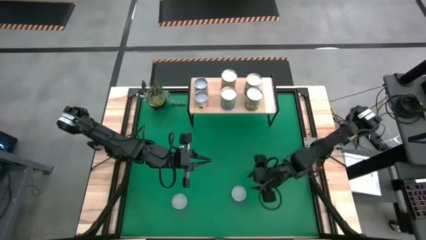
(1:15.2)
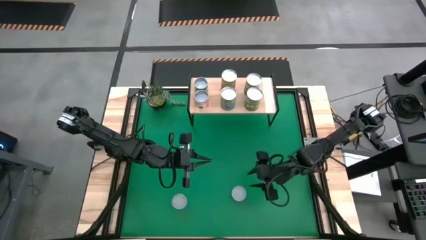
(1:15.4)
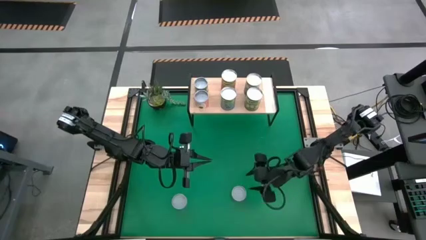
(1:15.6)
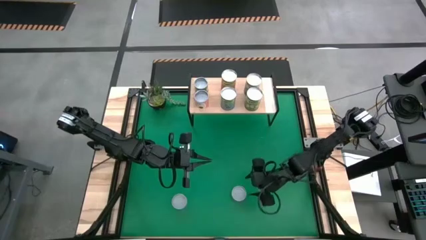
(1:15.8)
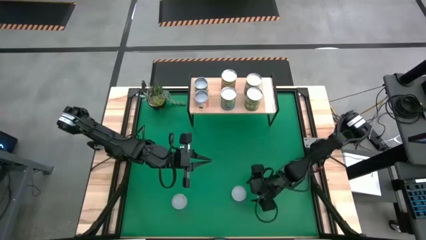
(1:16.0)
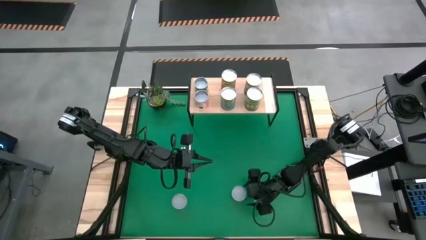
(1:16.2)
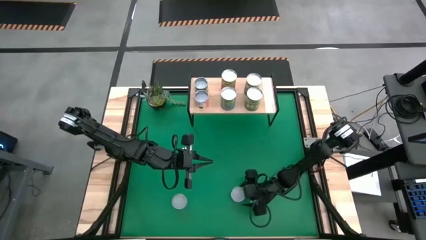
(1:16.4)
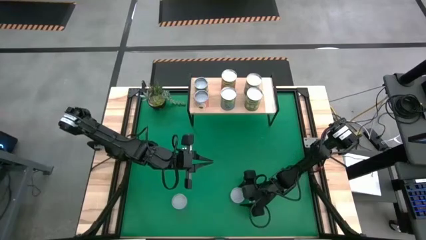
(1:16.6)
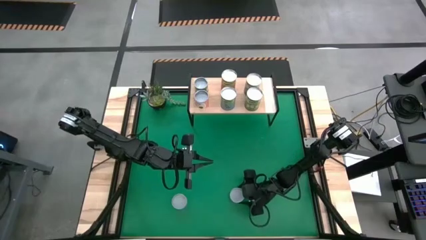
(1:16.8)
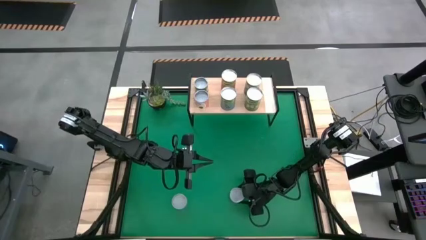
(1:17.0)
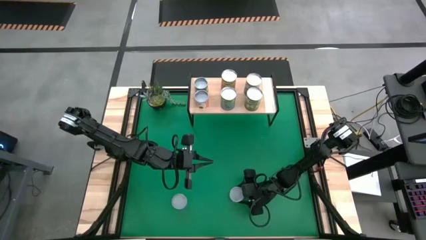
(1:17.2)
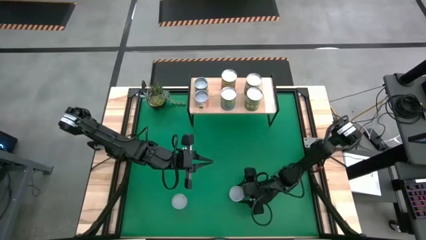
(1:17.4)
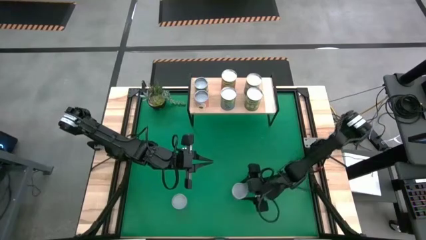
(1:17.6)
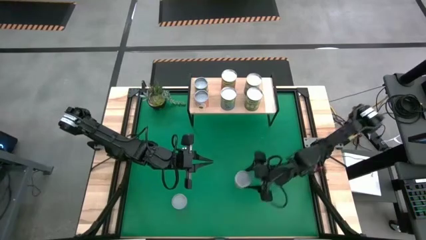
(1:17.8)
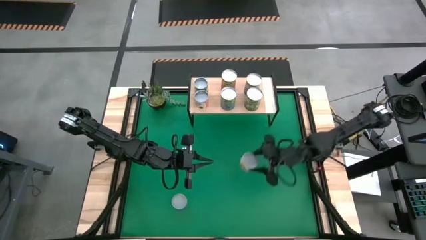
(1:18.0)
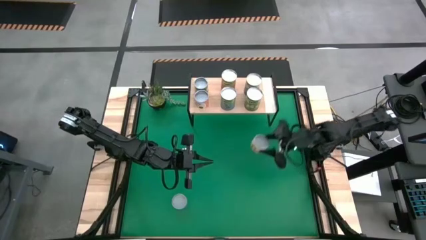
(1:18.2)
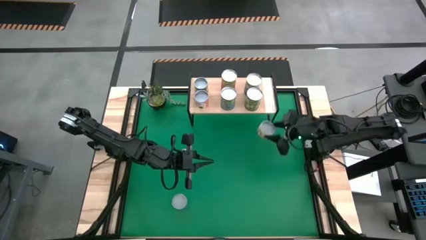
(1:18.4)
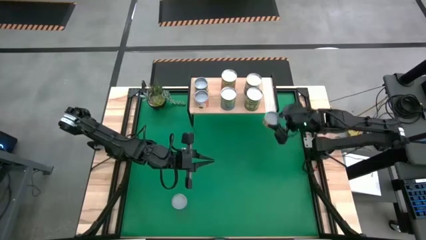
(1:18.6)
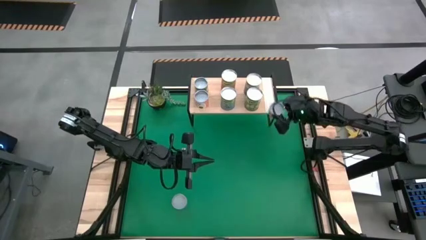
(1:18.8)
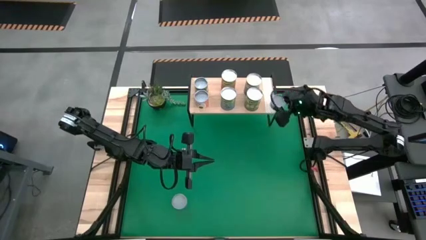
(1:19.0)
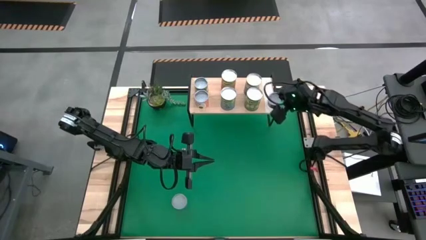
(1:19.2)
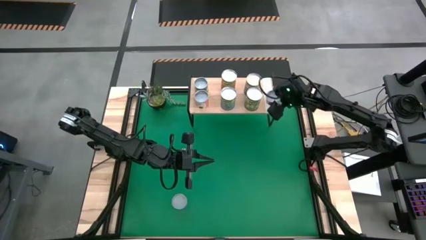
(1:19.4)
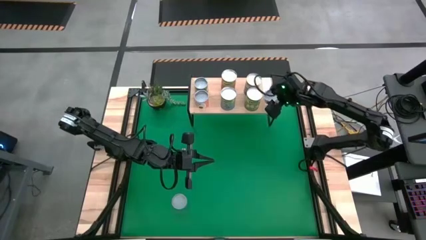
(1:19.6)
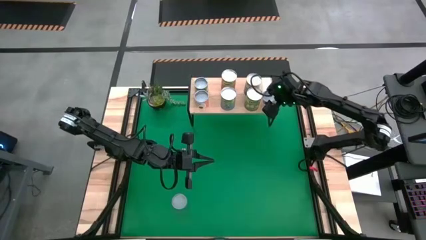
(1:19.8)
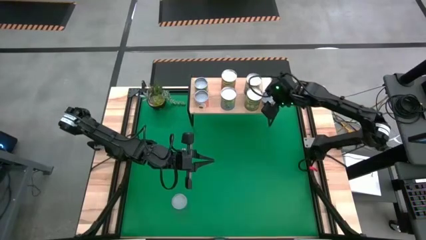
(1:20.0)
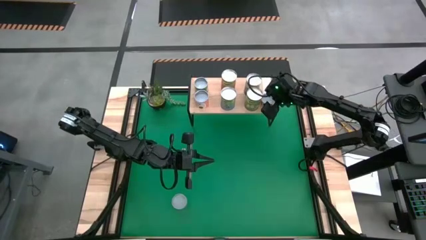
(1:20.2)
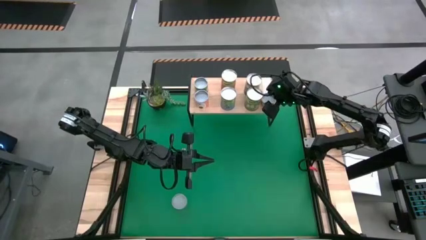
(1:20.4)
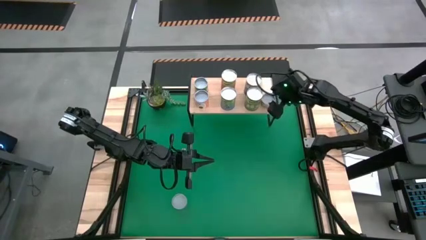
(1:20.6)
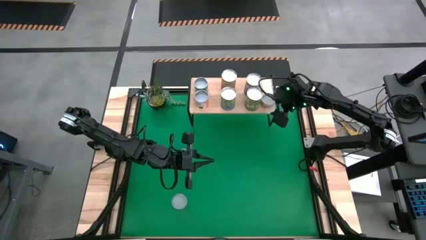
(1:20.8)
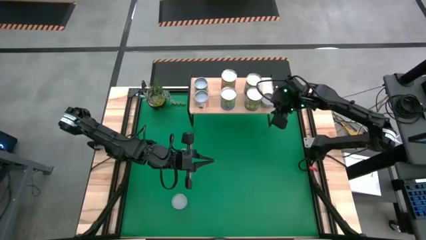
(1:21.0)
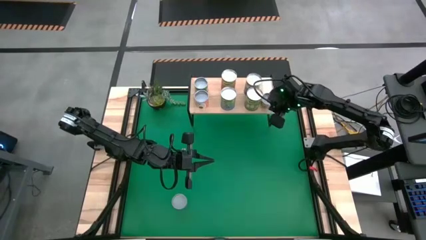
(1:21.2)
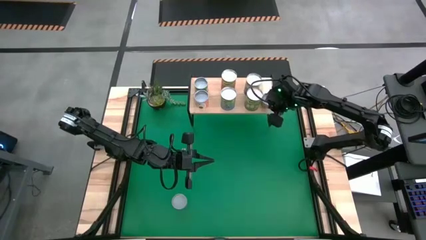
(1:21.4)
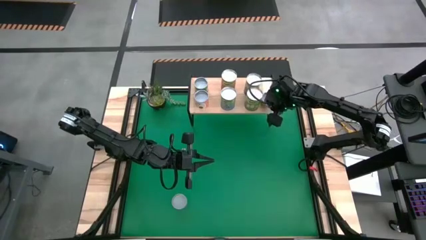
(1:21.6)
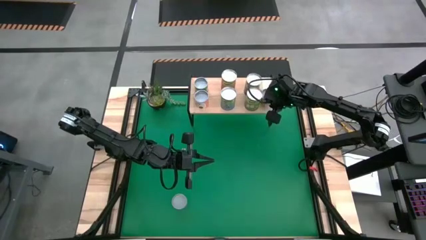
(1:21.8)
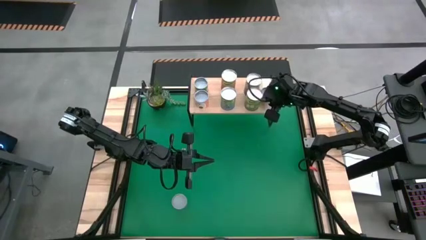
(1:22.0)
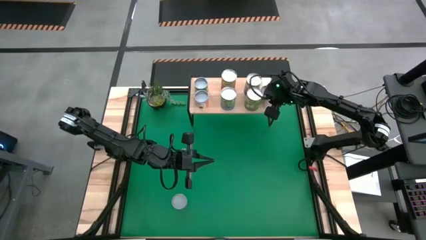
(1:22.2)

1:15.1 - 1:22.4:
Task: Pick and place cans onto a shelf
Put the canned mushroom on the shelf

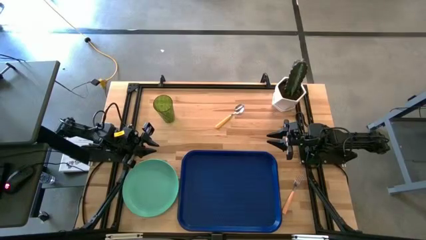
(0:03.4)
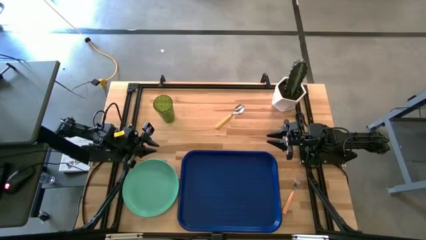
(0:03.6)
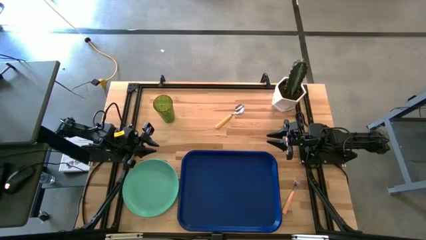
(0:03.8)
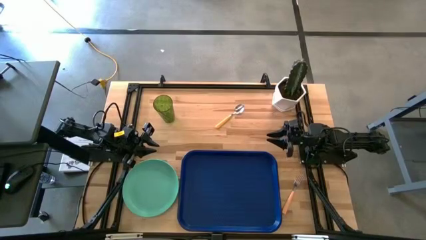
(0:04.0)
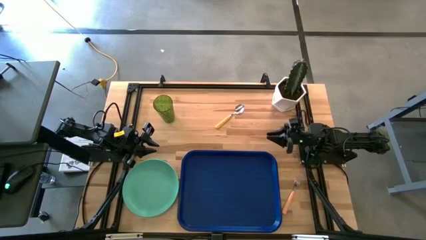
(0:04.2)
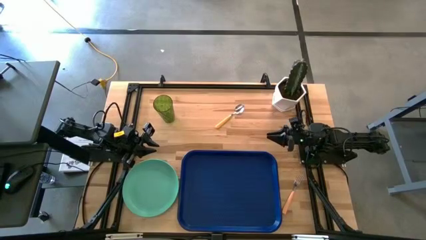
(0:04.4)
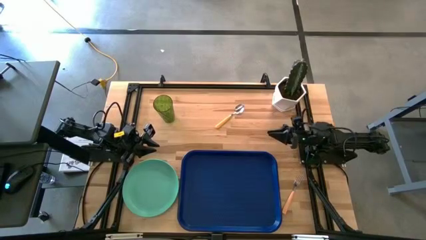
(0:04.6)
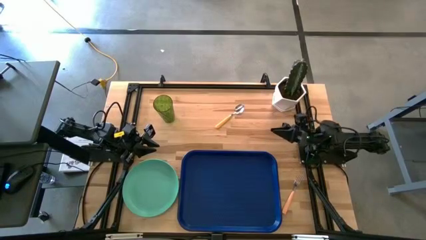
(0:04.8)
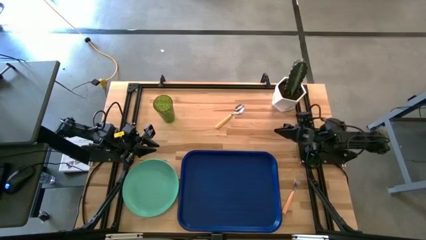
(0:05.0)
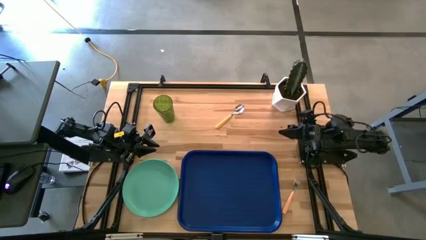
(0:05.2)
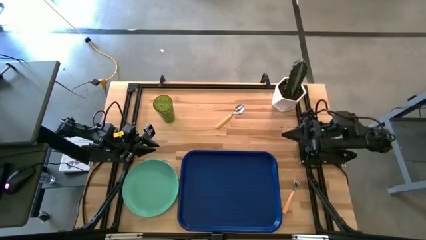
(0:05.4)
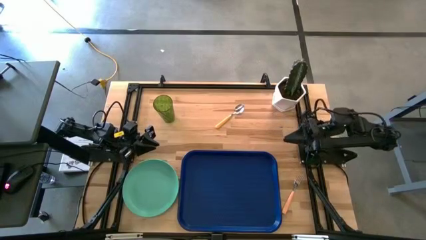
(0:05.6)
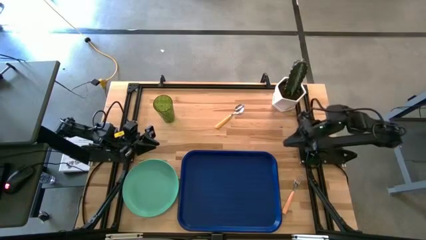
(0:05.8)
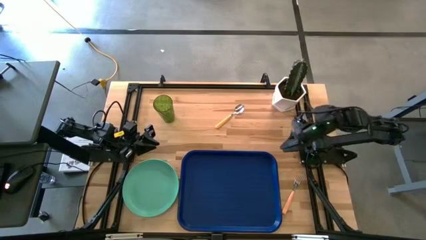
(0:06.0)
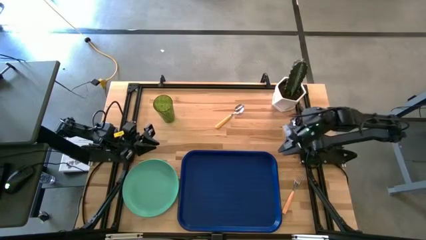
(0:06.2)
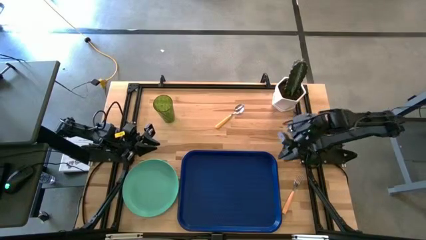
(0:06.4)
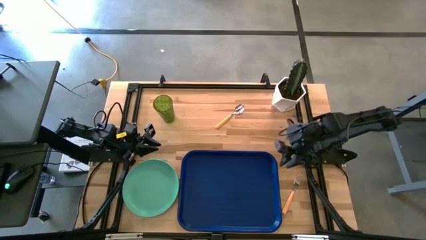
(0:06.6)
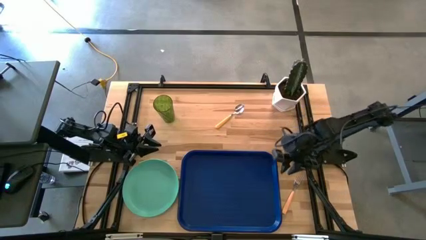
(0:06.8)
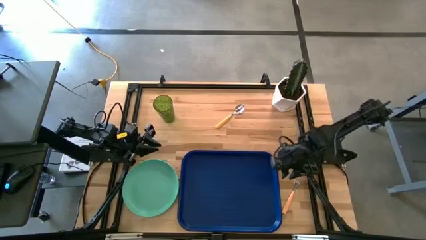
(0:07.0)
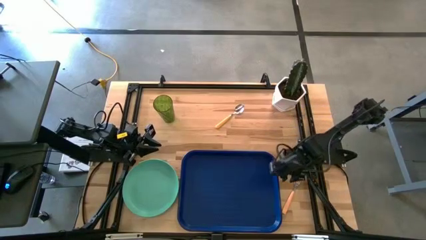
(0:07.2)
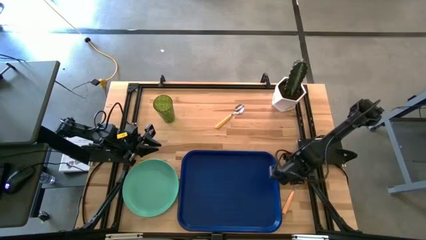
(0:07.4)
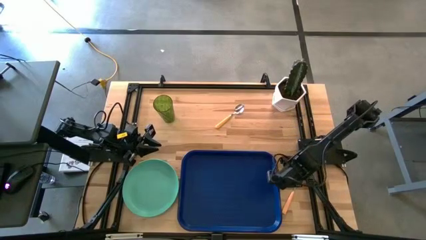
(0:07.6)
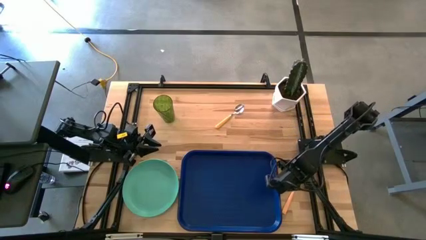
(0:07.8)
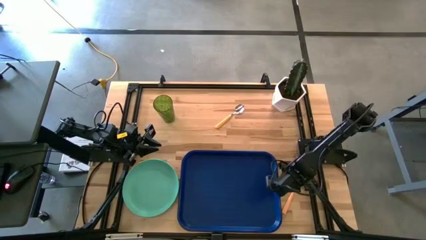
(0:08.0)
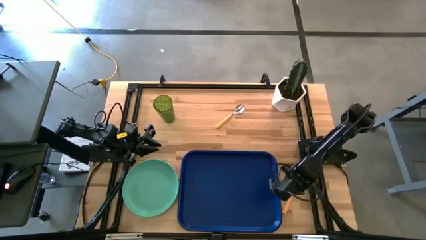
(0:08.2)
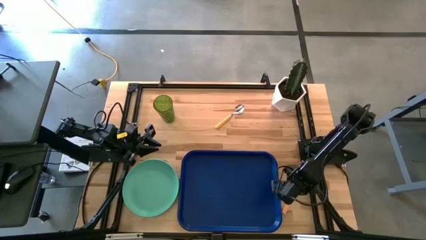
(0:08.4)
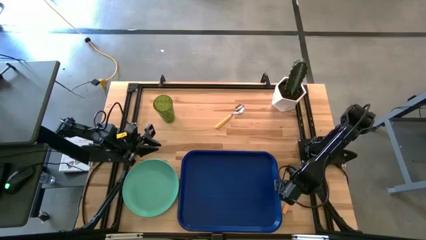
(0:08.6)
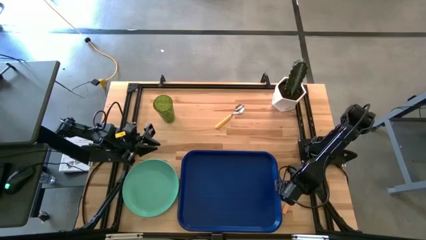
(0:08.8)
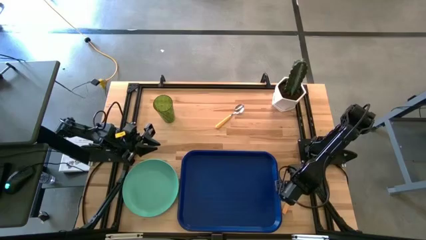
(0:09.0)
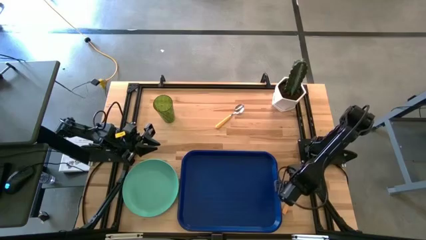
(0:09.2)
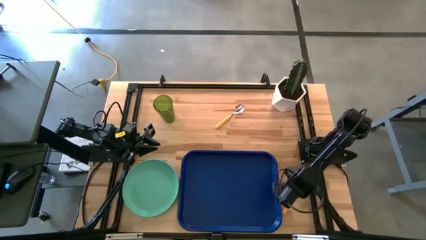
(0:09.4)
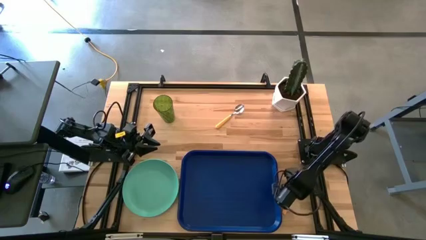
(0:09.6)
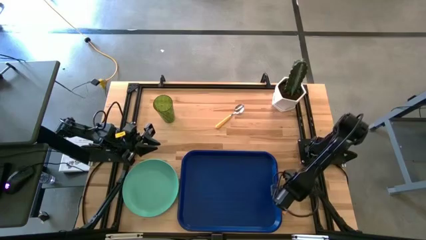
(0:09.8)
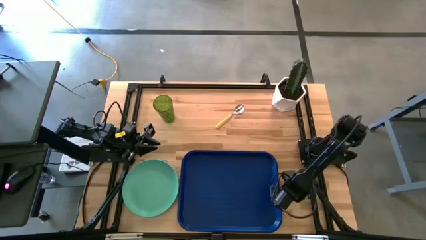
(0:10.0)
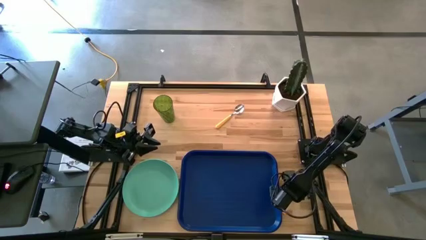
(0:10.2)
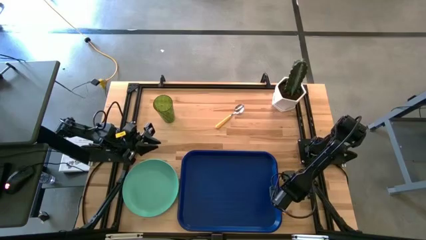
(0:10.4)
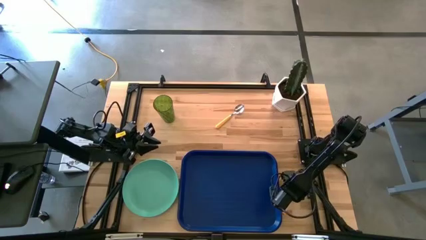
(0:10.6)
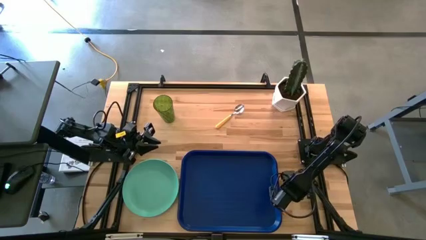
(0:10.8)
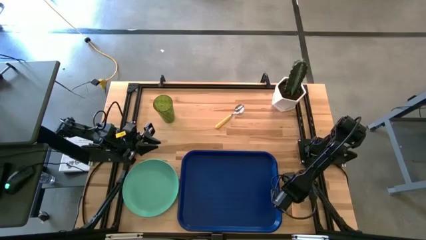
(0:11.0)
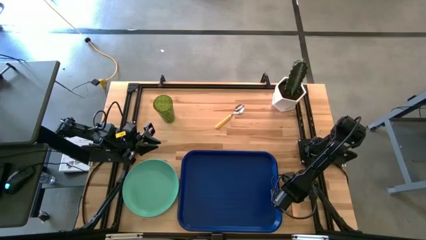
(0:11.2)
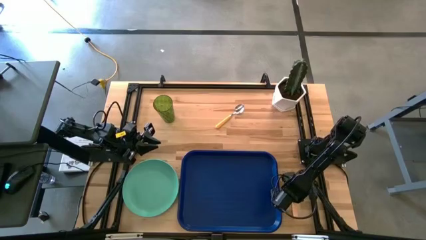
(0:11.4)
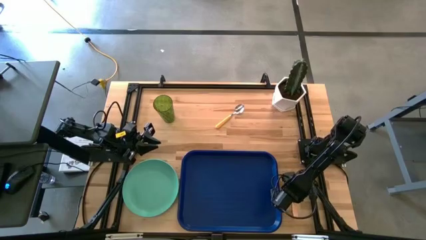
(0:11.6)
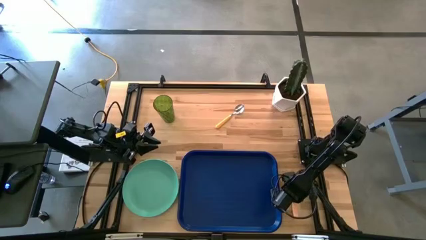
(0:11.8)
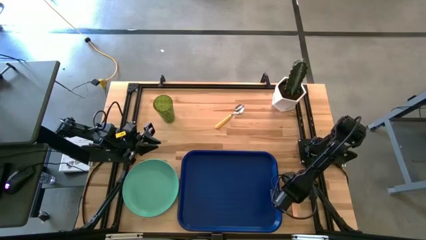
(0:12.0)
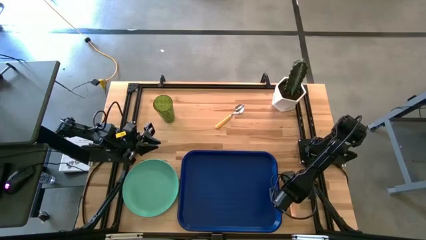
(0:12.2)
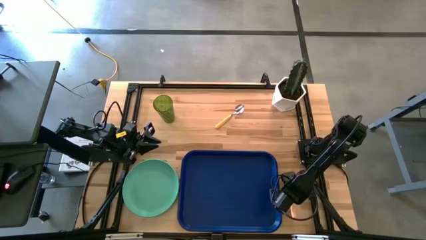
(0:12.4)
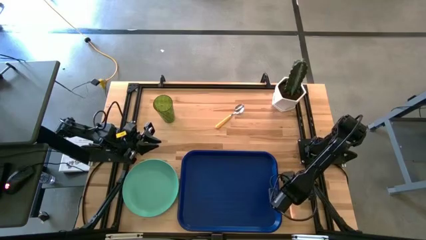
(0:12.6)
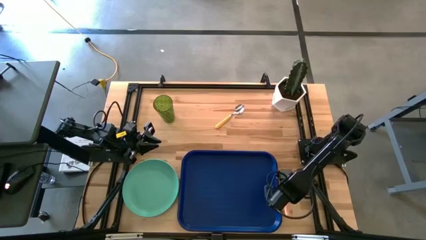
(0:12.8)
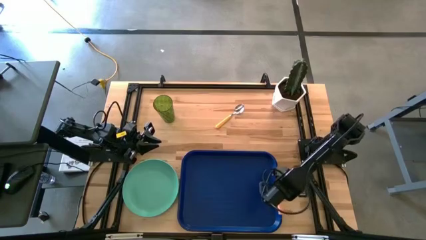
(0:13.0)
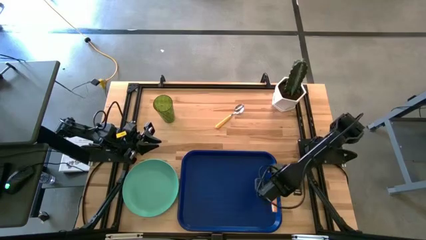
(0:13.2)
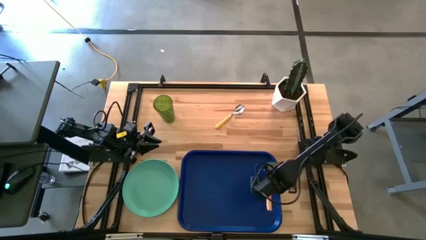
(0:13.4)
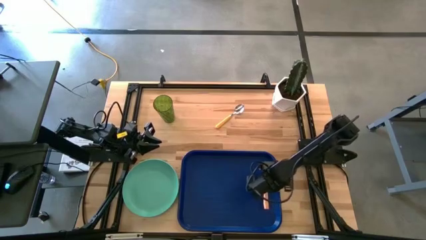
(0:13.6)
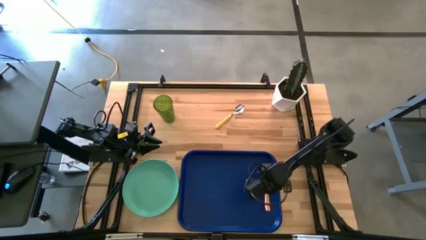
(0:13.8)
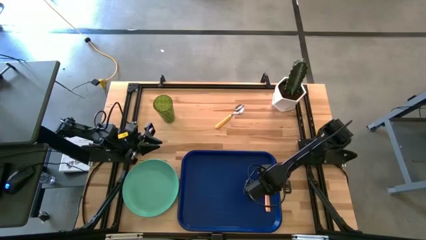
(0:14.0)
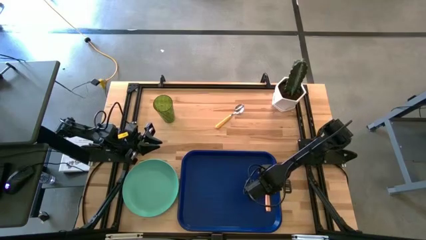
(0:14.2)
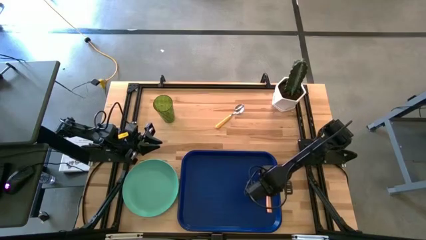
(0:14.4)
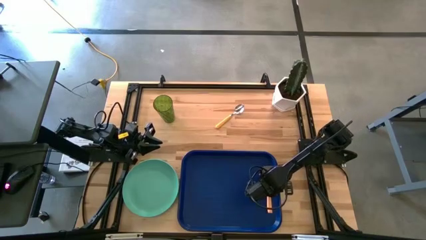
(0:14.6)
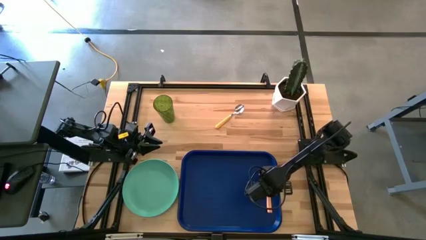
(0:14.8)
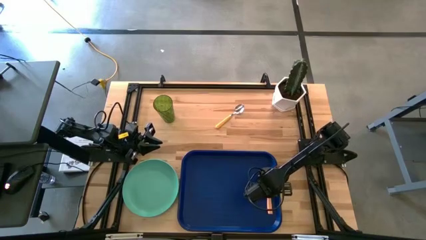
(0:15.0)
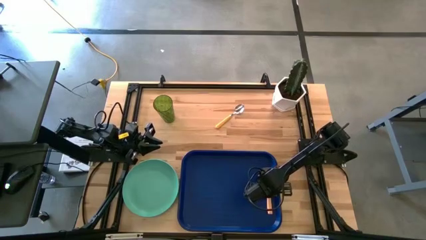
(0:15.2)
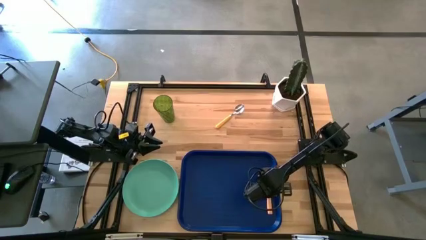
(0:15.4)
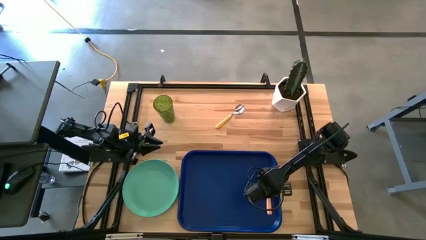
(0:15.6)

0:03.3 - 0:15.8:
Task: Pick and place plate/cup/fork/spoon on tray
Put the orange fork on the blue tray
